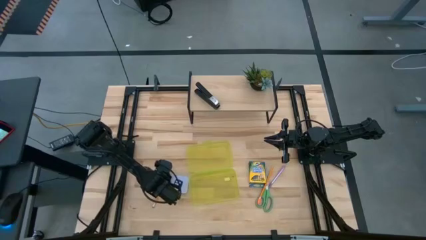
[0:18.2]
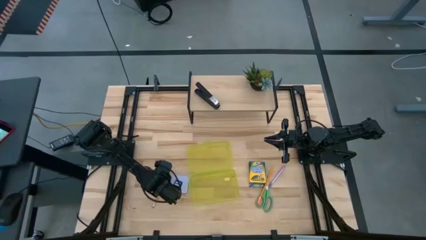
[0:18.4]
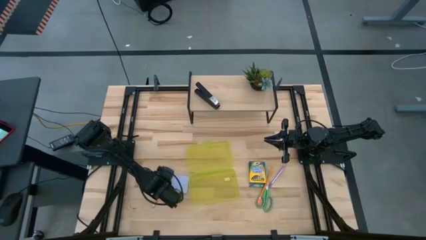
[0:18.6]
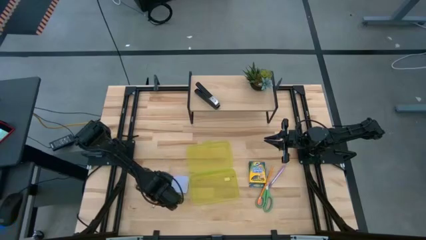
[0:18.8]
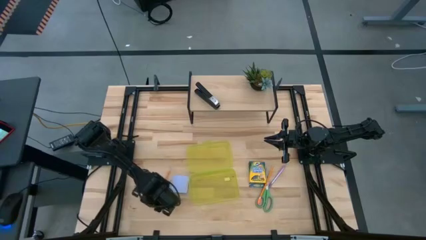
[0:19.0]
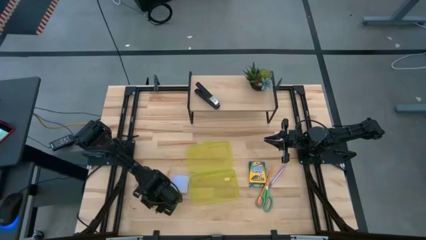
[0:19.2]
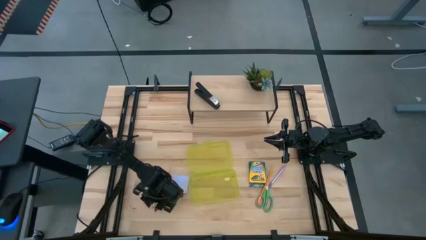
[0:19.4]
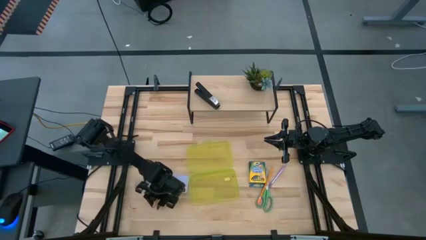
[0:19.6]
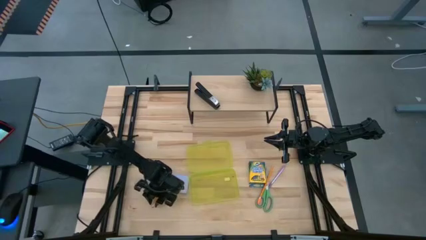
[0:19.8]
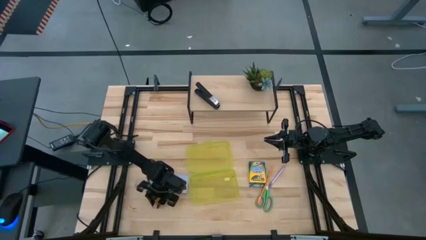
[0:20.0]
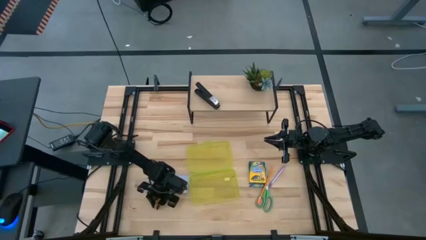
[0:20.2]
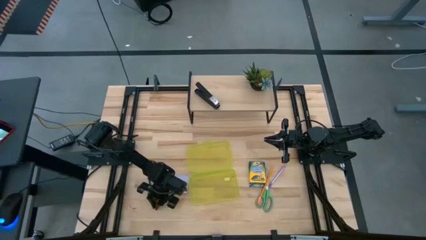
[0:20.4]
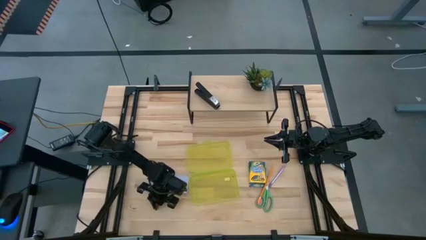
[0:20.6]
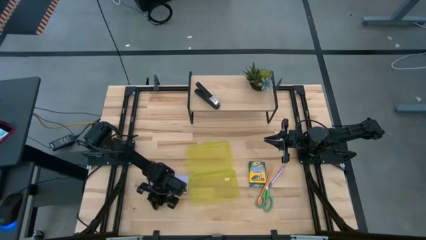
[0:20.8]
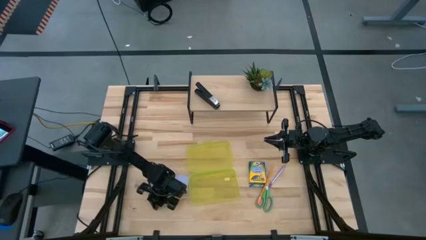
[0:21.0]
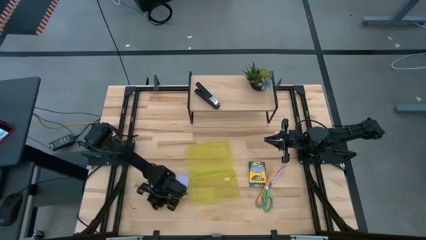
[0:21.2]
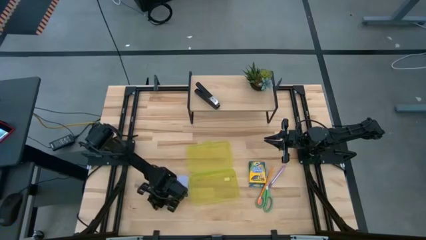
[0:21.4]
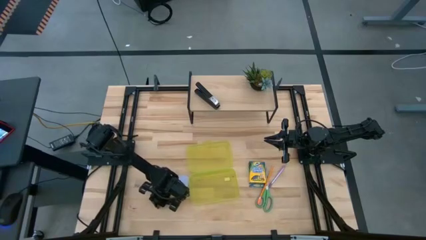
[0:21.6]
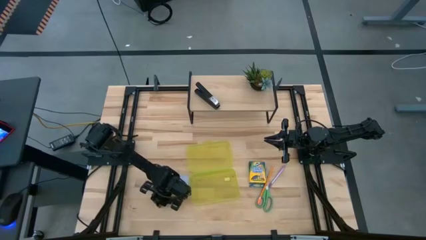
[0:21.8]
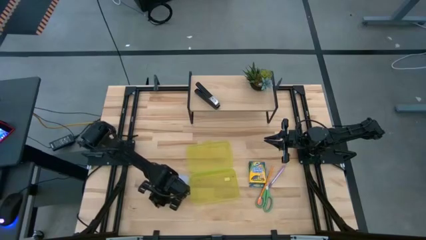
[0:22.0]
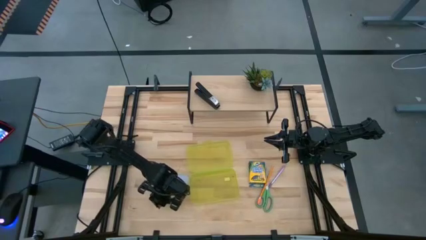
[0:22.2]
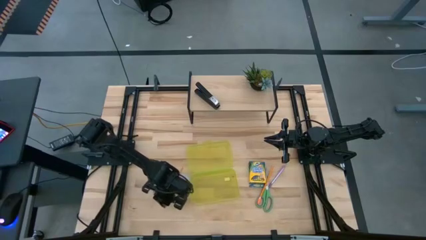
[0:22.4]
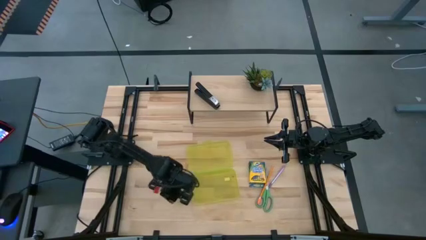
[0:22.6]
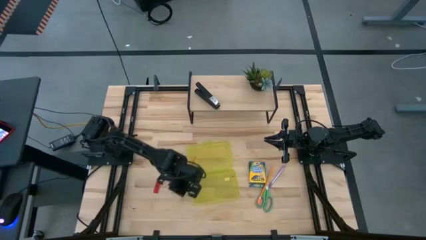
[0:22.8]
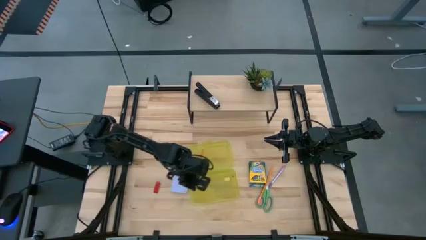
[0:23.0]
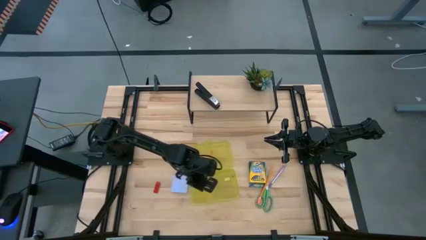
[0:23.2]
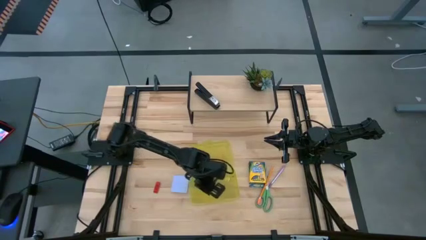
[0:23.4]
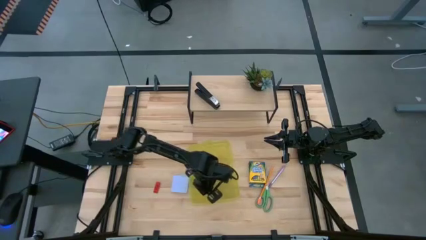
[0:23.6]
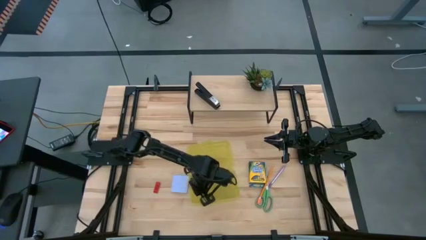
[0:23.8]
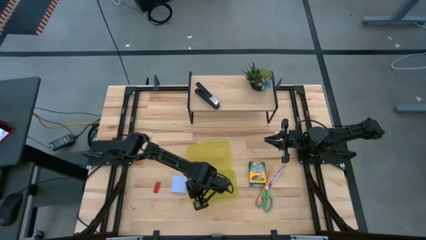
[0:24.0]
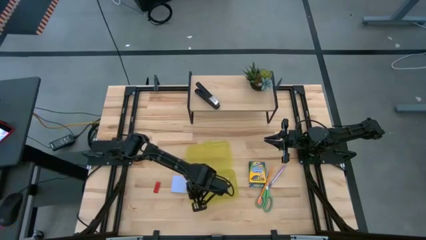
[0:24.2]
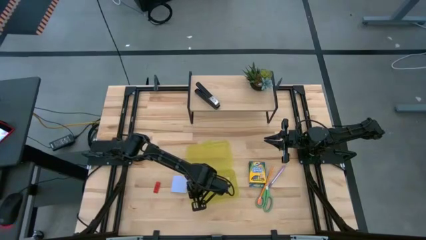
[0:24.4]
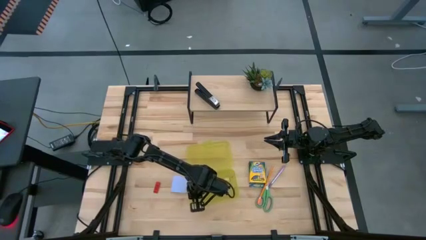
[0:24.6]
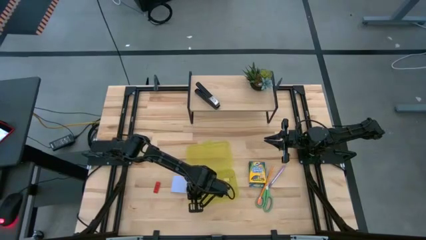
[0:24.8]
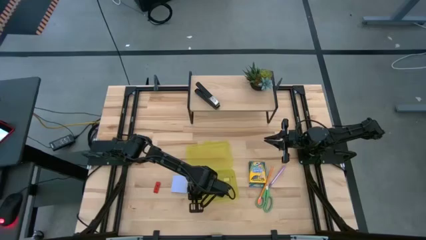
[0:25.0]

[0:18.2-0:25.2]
Task: Pack school essentials
Put the left orange pencil into the yellow supply box

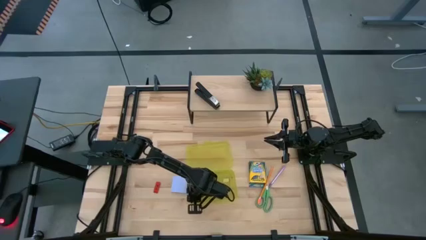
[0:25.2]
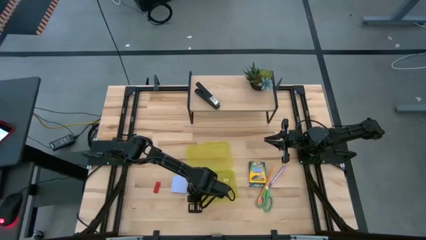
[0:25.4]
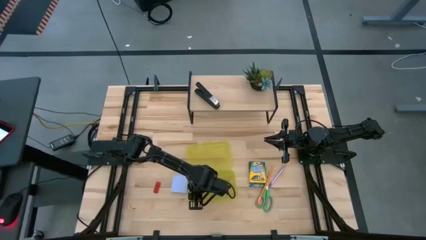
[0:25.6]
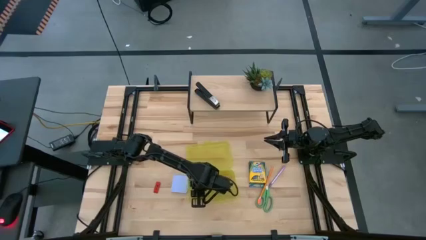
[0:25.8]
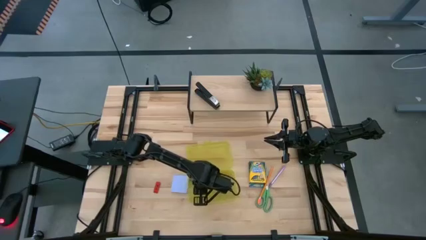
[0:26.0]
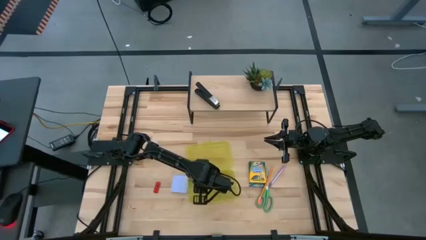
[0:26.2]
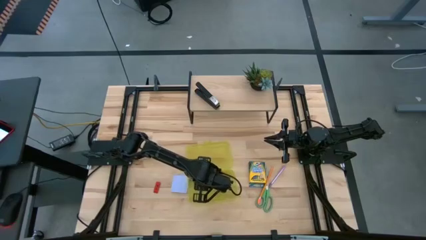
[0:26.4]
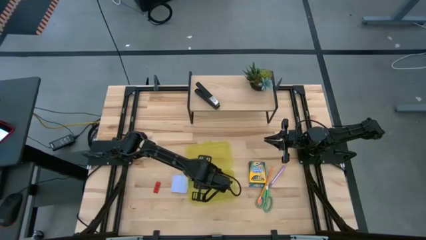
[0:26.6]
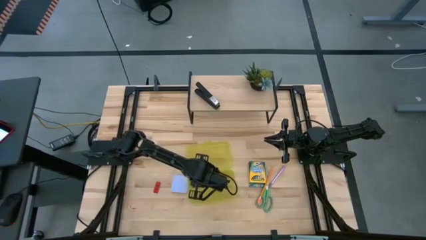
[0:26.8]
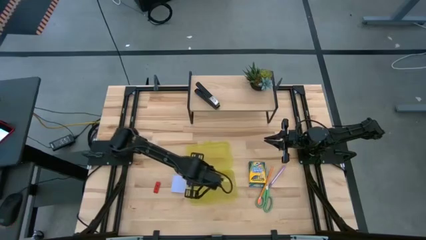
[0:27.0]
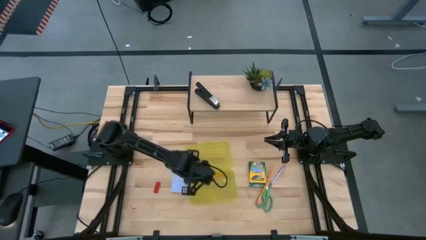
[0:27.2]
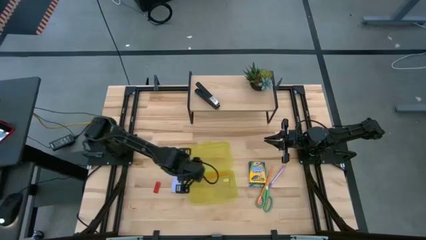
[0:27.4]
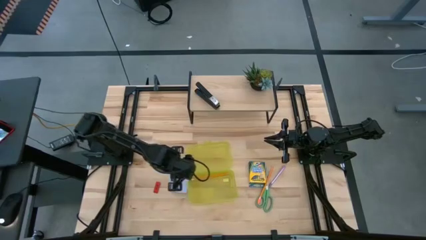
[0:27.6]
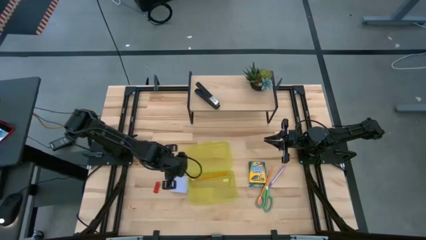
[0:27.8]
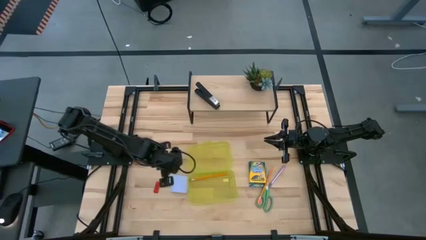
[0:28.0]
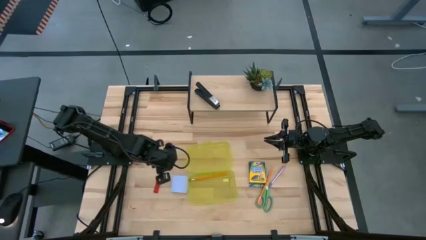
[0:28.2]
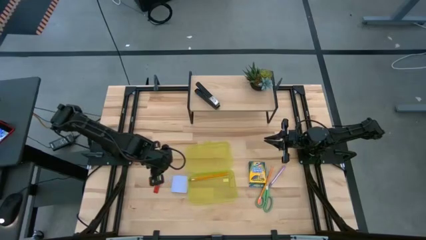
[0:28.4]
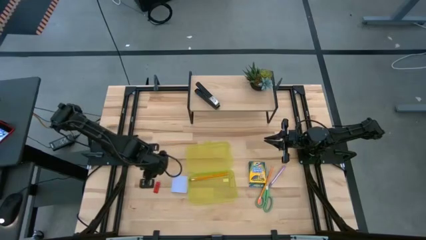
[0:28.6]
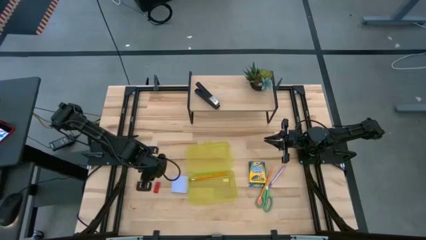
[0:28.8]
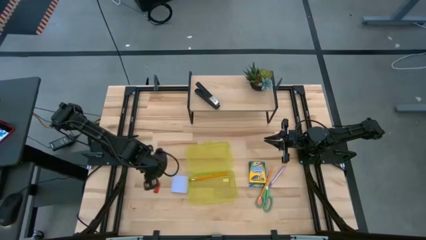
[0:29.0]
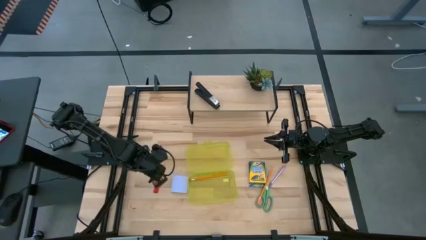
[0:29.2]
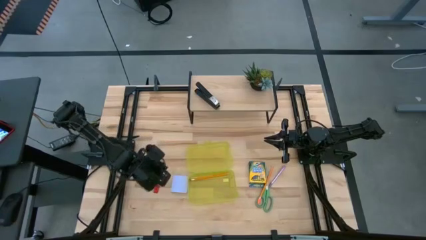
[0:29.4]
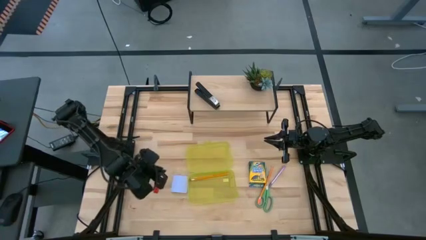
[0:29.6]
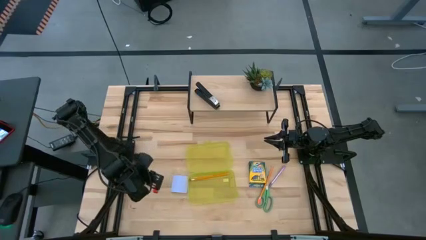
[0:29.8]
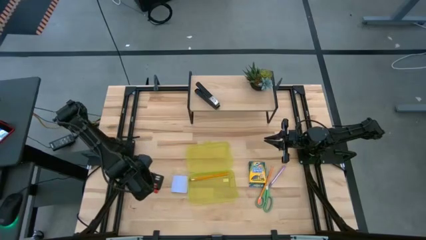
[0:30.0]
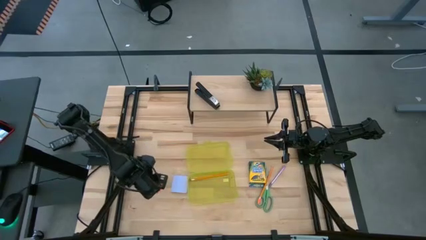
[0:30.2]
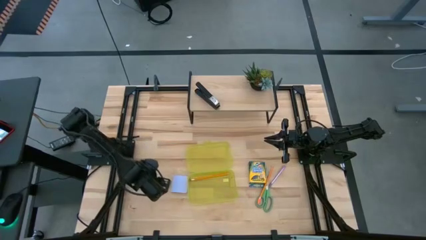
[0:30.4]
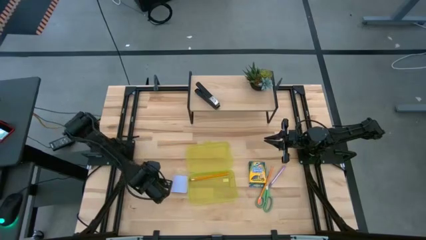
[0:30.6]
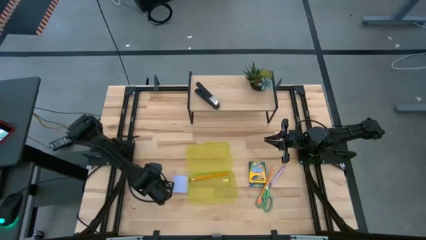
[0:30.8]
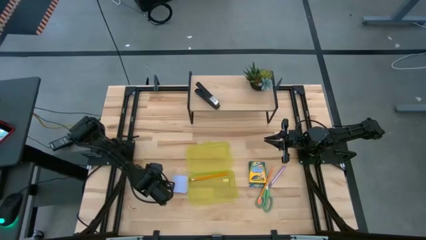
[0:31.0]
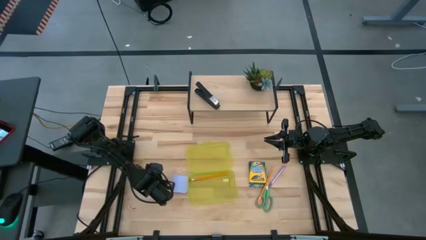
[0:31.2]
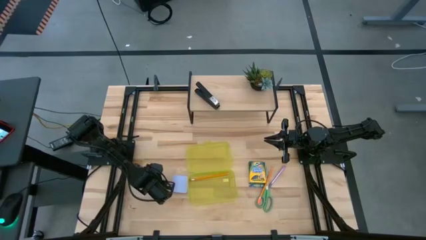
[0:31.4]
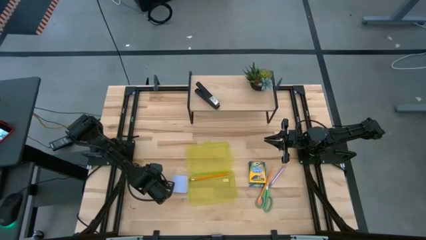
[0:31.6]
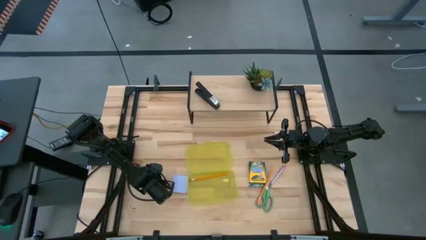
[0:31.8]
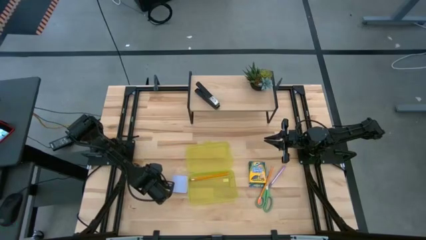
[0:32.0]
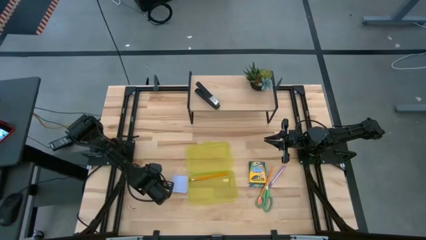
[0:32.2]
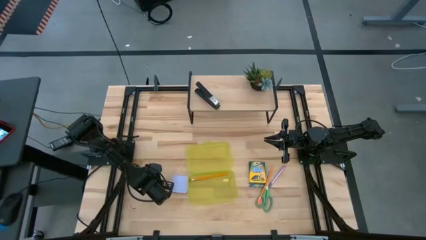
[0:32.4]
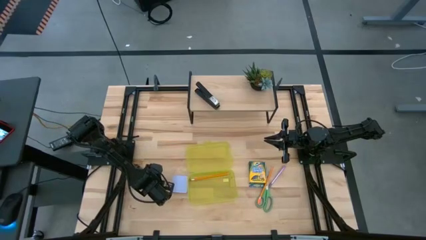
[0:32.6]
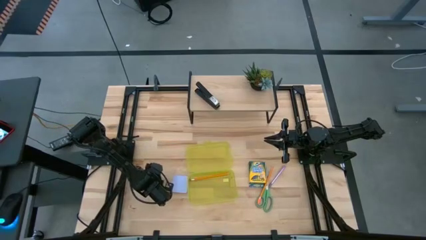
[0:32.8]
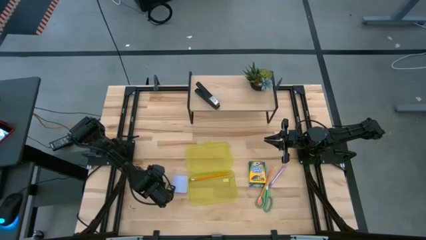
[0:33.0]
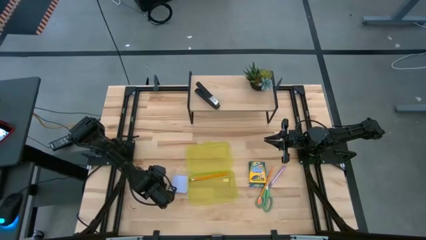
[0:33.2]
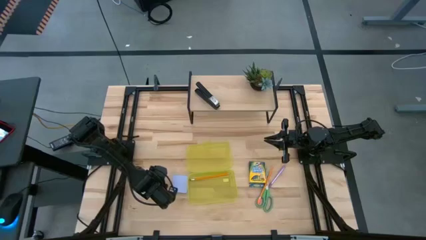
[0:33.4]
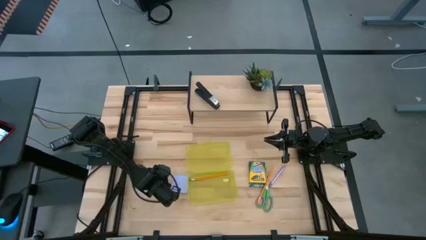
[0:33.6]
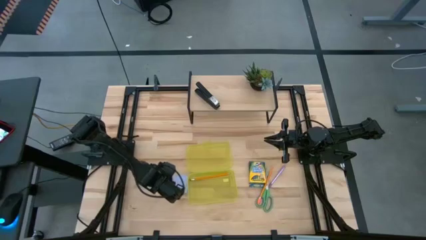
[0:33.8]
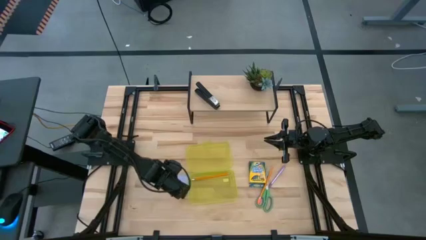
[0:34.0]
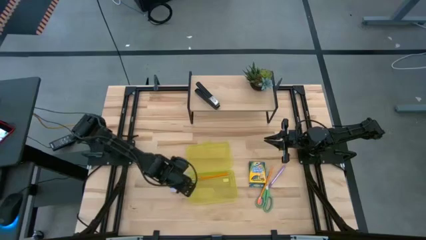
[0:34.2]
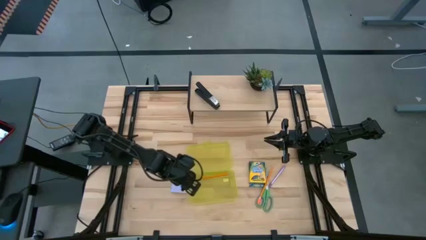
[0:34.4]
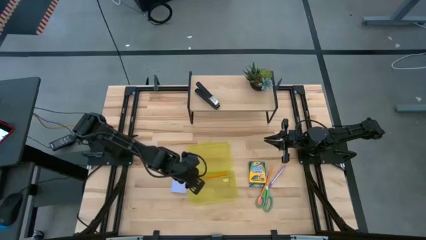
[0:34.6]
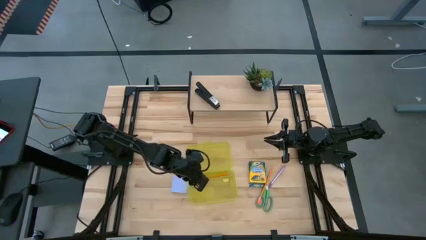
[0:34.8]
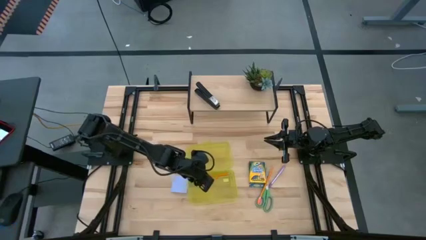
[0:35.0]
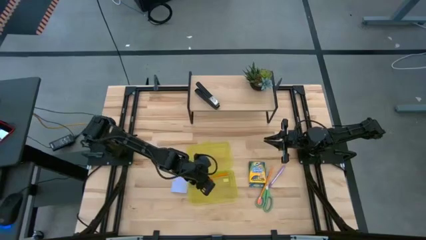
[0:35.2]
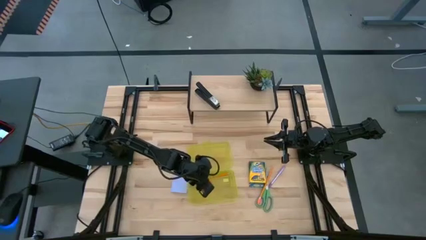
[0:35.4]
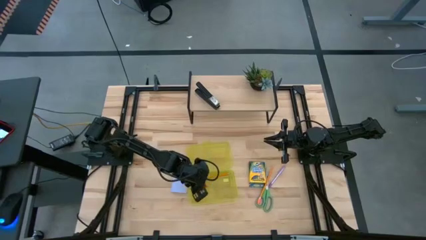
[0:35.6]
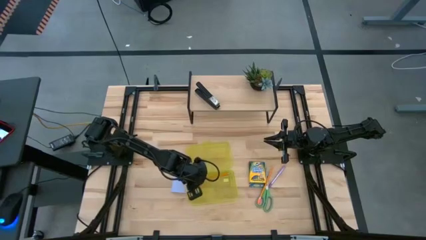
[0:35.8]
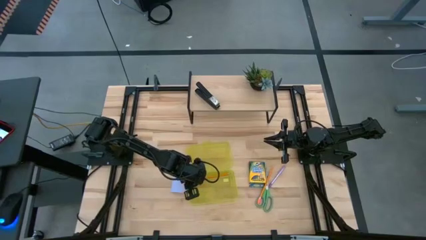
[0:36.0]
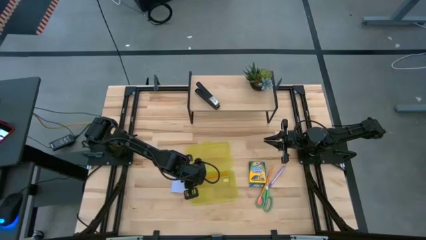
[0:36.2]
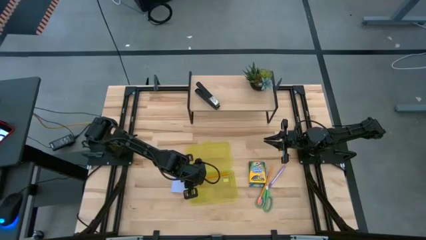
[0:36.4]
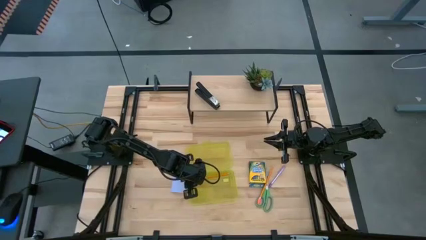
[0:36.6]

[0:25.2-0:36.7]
Put the red eraser into the yellow supply box
